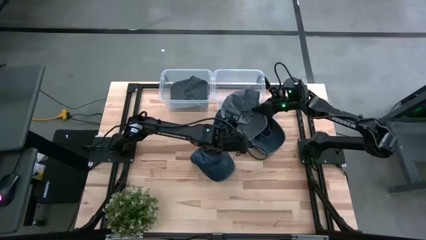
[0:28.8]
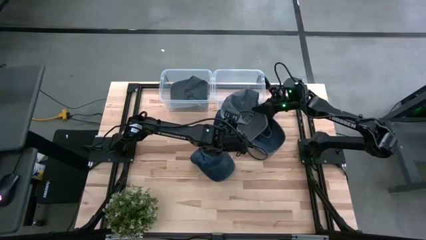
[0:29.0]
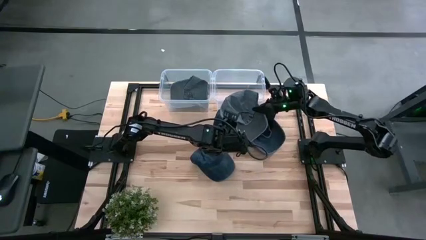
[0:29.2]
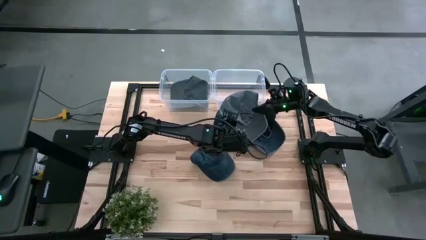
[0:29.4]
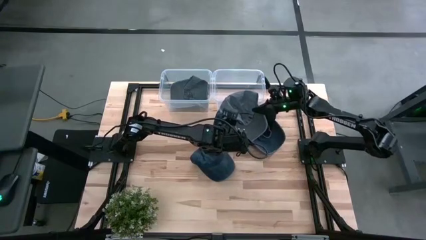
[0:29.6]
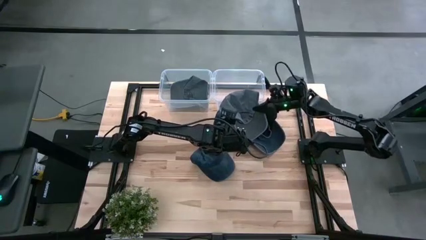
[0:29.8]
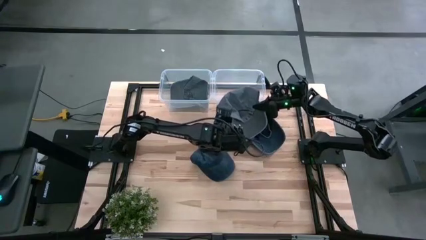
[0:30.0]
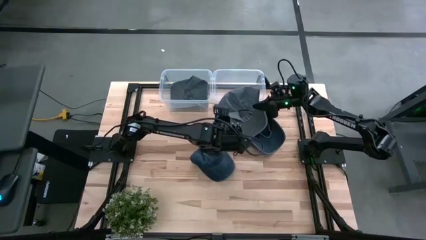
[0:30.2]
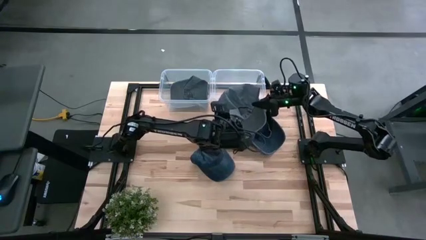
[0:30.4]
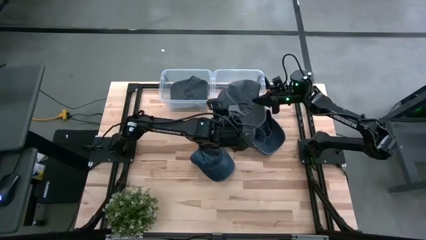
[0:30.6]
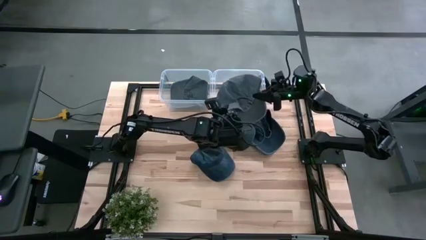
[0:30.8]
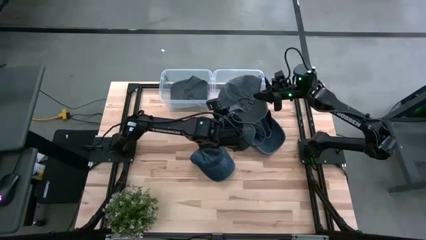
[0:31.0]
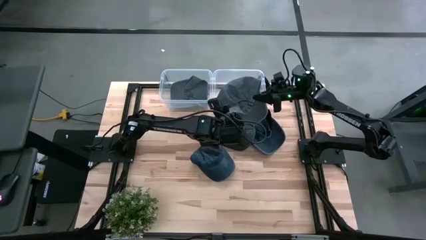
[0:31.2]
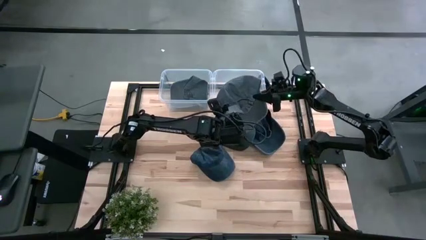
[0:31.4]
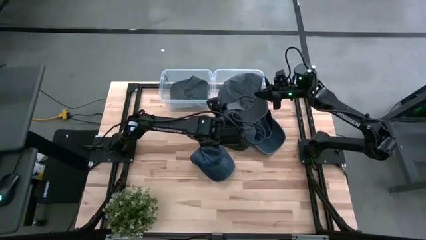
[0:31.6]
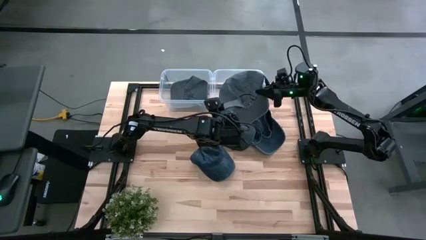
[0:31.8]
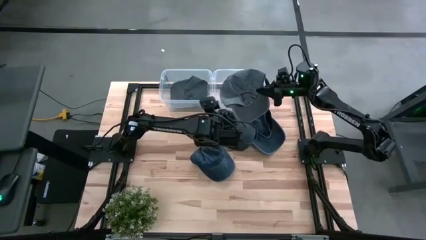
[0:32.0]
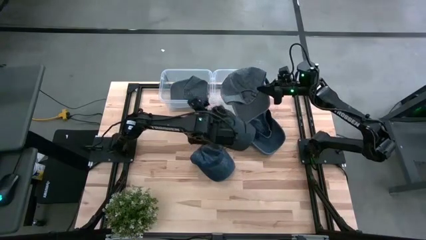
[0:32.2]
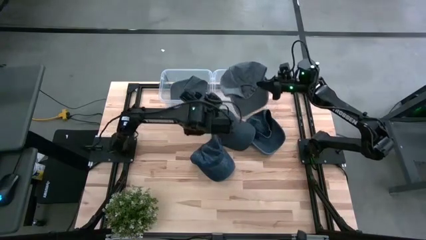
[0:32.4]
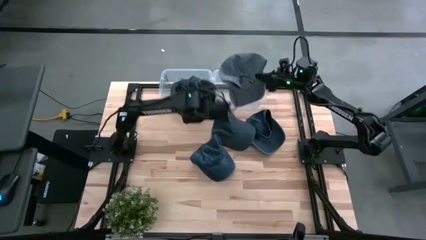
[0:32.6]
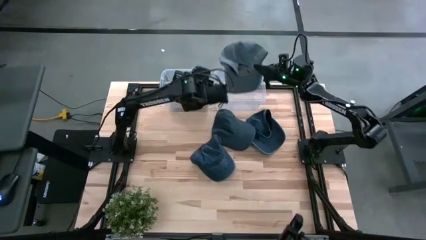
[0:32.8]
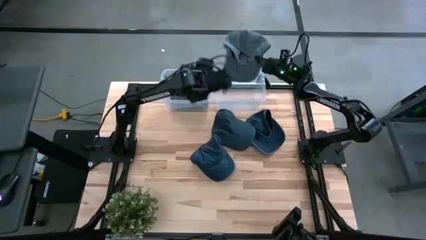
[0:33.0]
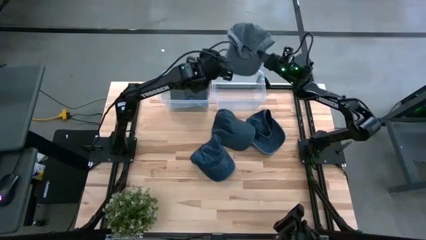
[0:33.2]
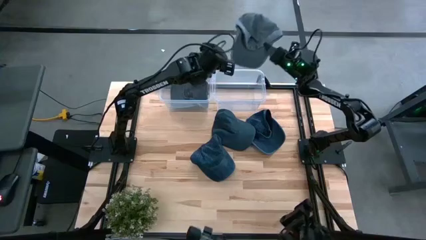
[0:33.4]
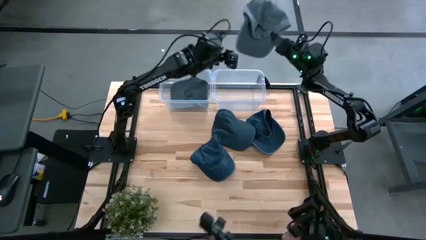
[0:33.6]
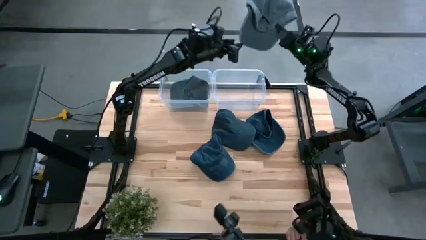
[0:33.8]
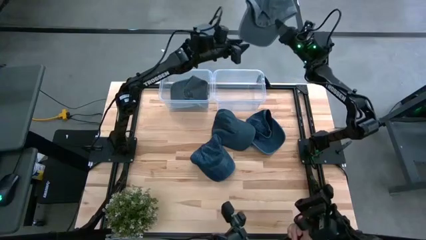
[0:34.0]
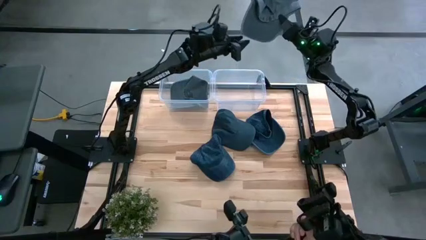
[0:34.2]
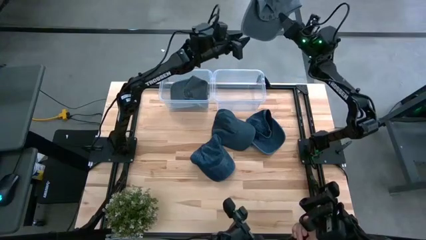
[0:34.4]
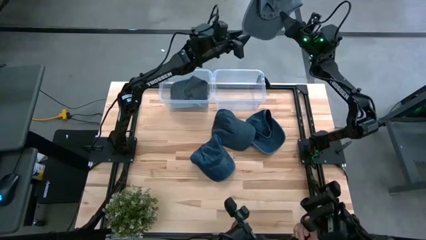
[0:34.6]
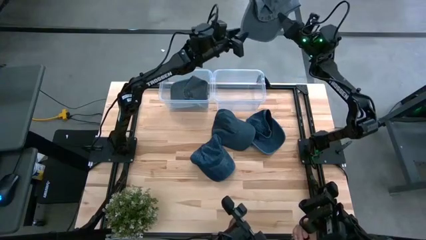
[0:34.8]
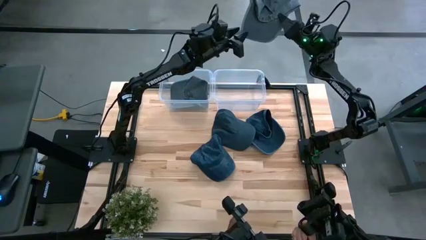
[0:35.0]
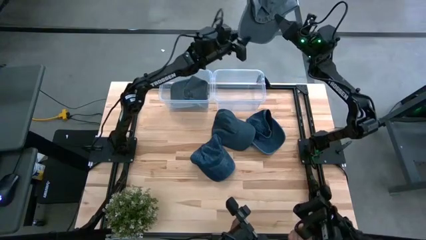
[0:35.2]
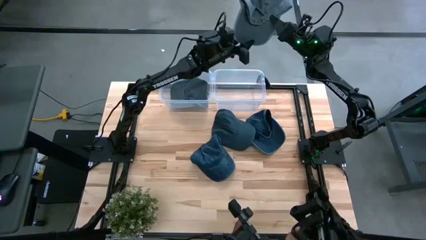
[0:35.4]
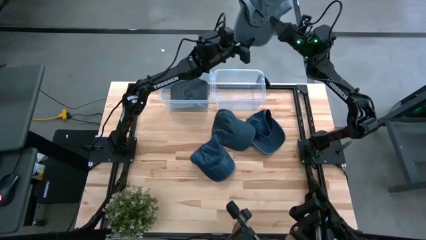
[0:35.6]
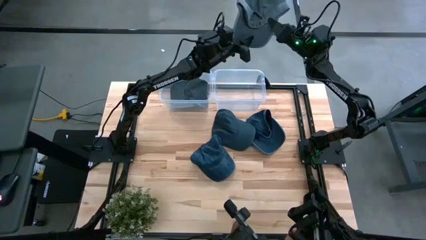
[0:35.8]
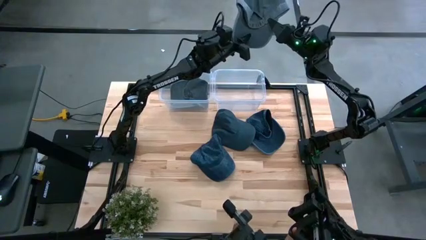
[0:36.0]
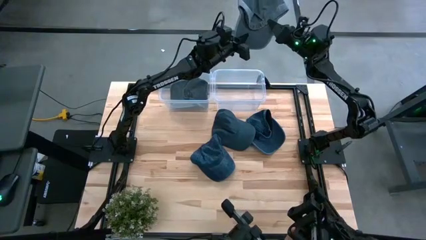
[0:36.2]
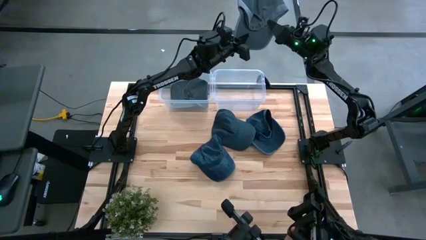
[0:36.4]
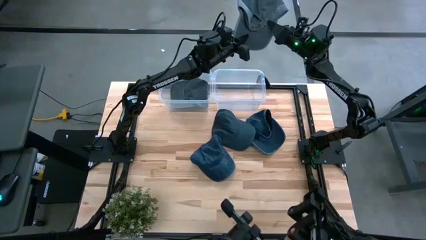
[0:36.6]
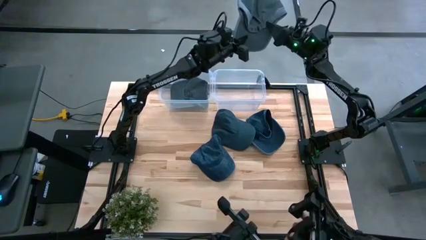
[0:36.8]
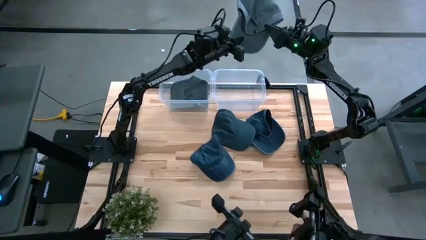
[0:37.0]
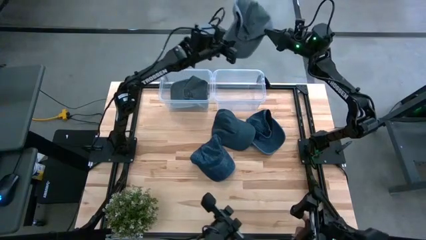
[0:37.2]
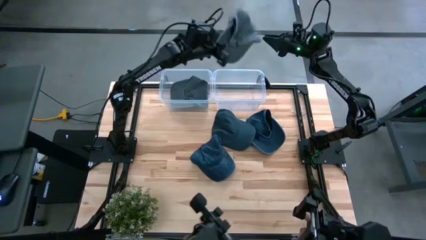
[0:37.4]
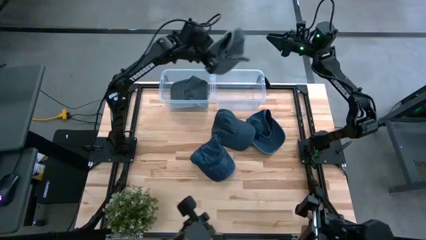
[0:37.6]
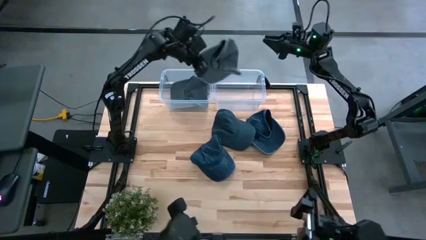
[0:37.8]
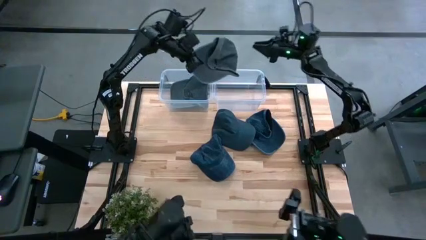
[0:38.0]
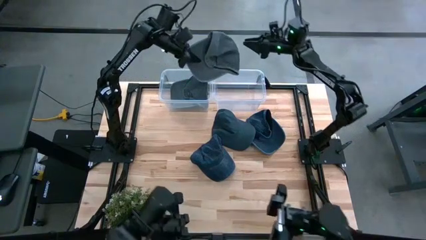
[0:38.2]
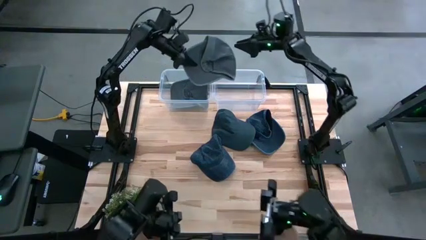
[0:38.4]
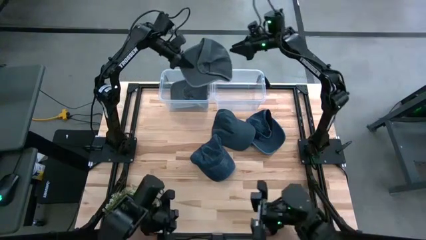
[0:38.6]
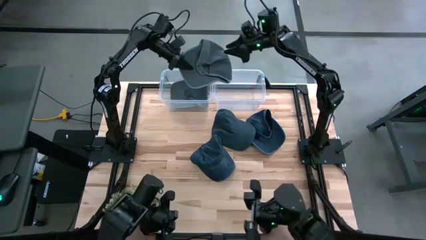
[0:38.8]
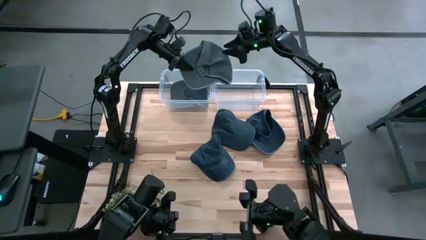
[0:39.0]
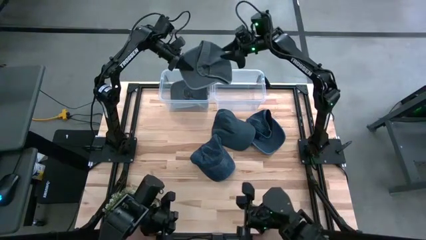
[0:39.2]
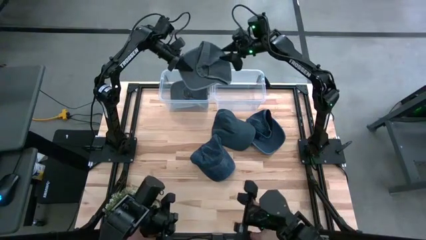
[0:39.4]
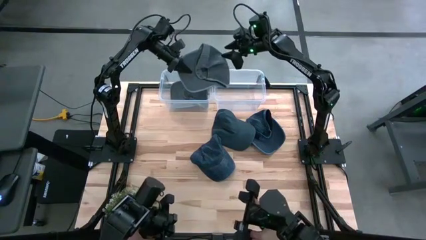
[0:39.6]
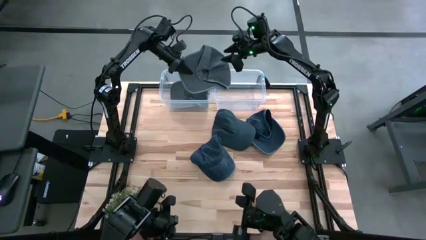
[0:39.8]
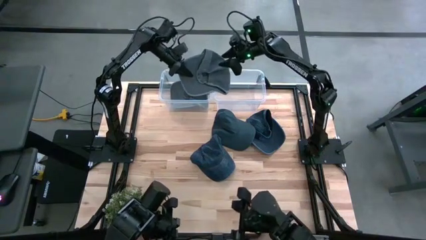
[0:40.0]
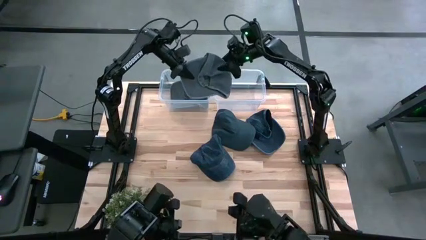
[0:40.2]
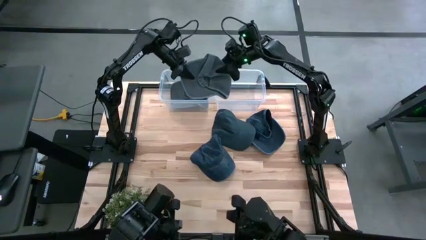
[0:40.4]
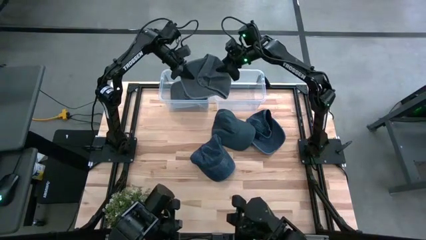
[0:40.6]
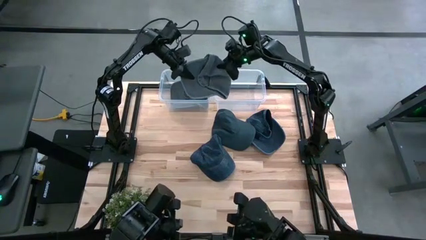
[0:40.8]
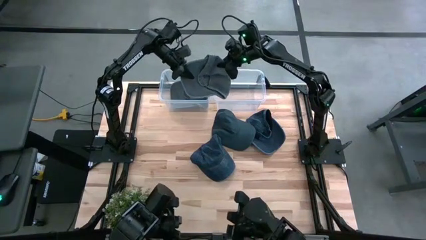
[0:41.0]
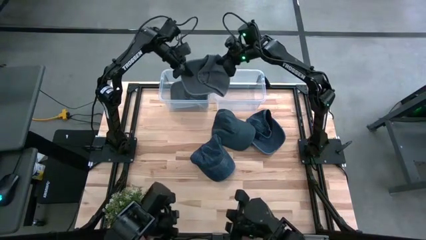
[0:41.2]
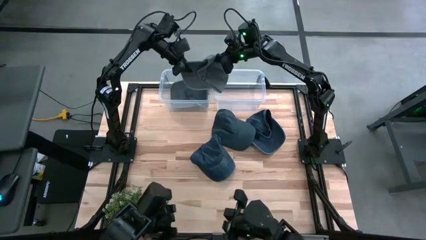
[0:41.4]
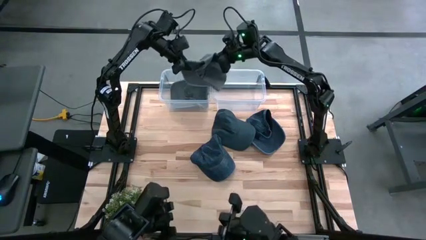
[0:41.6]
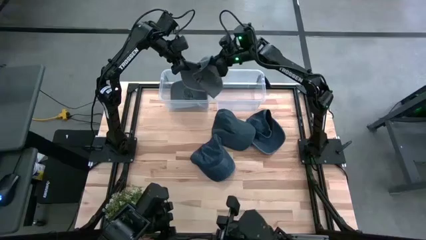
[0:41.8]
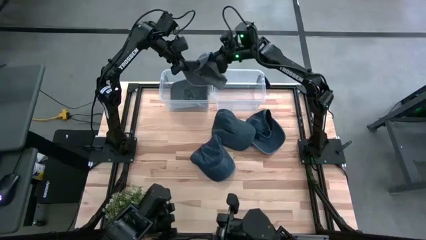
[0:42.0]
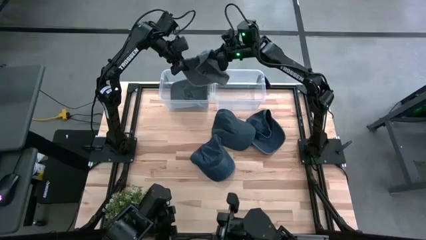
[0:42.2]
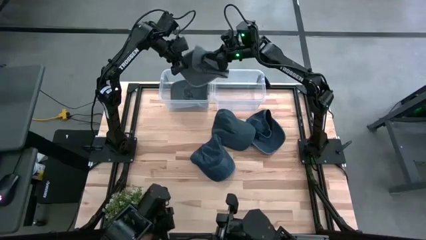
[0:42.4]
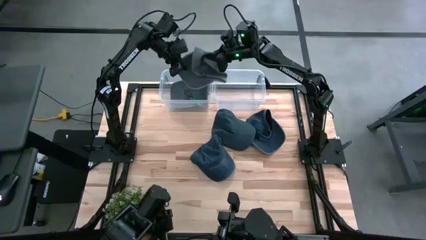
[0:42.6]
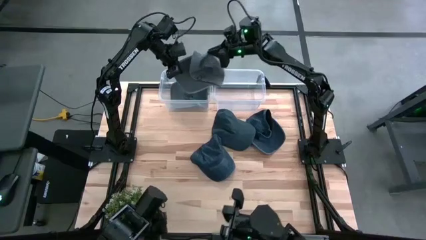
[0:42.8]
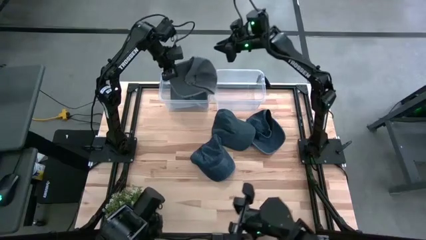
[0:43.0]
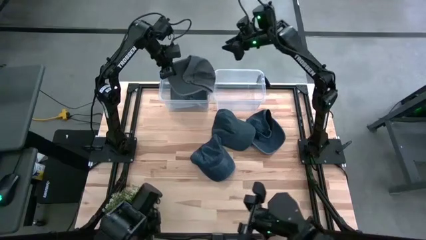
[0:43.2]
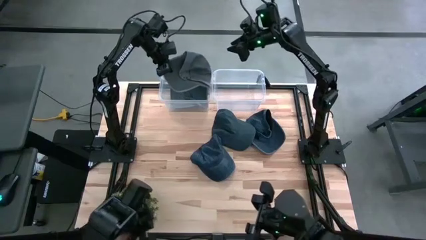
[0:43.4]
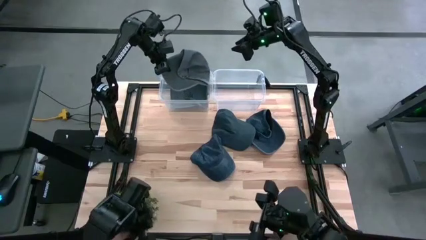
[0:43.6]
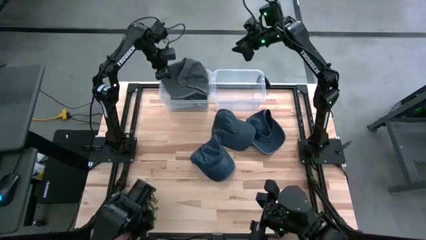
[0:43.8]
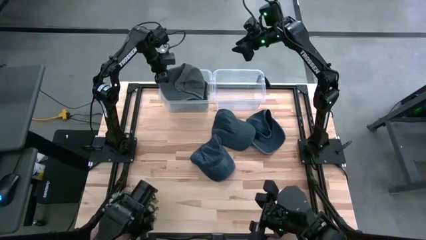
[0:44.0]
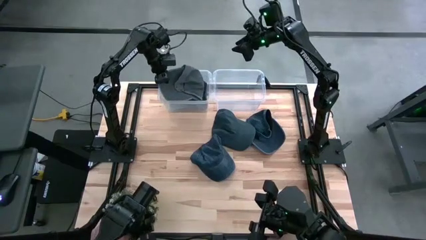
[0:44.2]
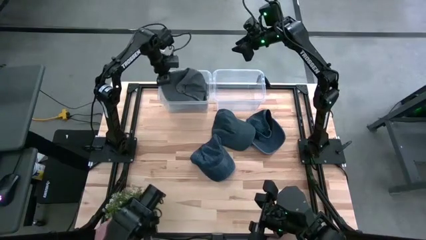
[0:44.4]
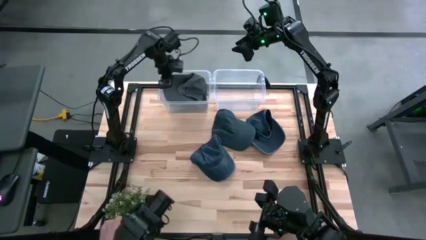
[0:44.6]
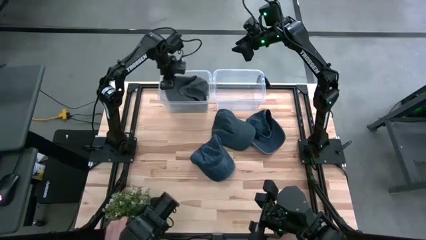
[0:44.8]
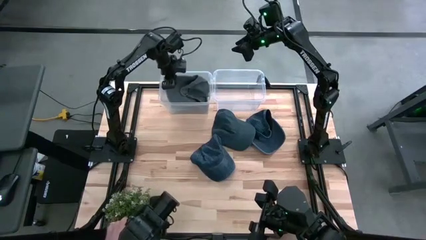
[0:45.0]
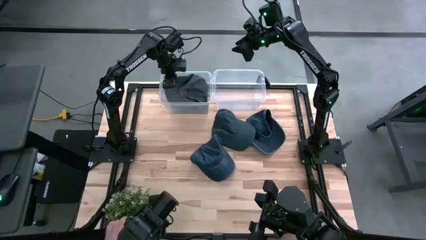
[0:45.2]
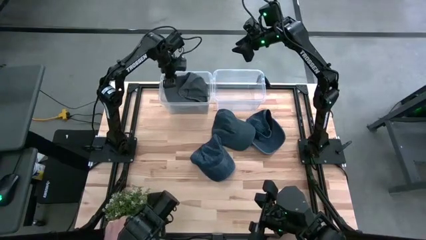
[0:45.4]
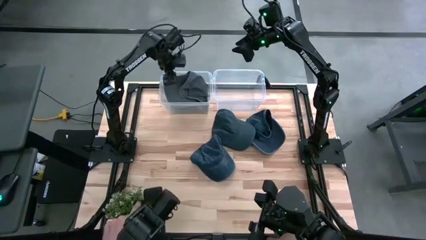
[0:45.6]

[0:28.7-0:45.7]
Task: Pick & Place hat
Put the gray cap into the left transparent bin
